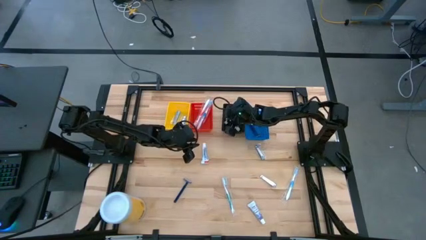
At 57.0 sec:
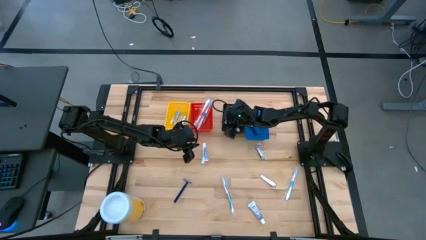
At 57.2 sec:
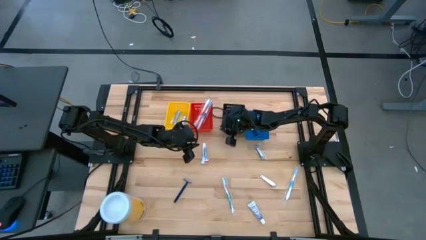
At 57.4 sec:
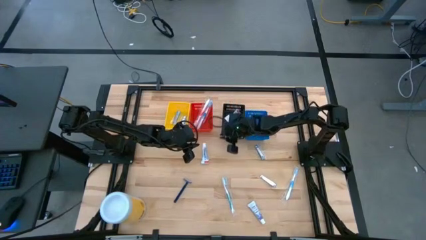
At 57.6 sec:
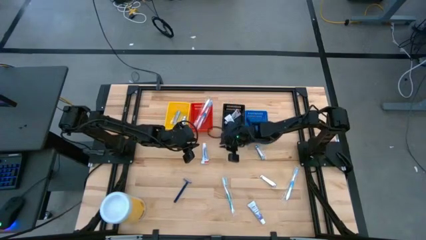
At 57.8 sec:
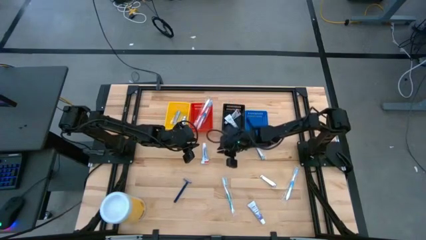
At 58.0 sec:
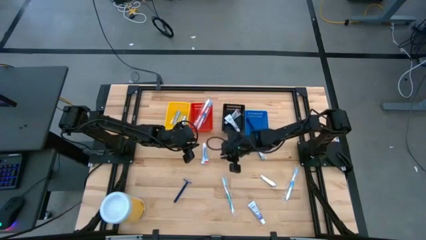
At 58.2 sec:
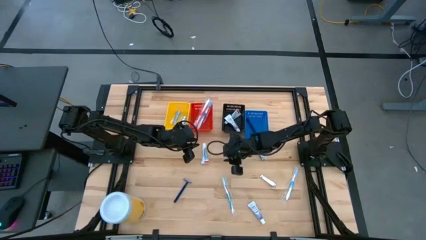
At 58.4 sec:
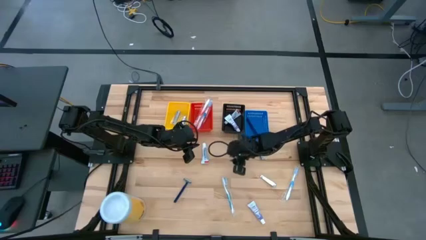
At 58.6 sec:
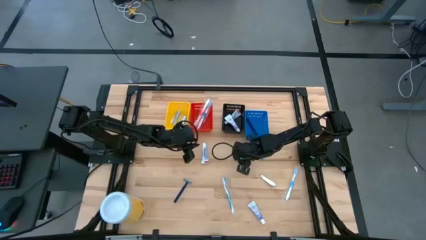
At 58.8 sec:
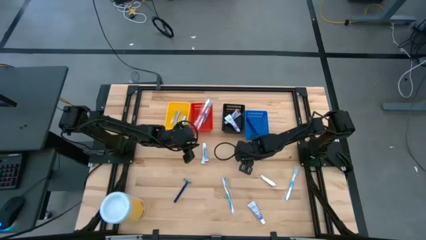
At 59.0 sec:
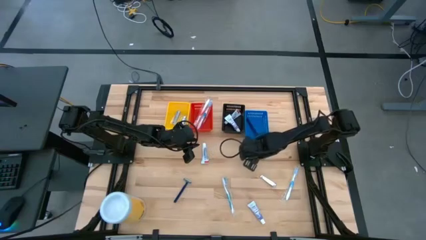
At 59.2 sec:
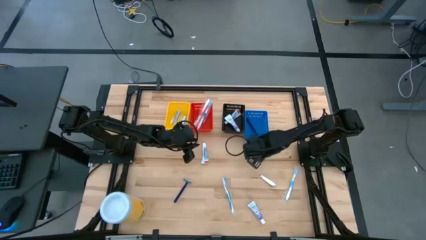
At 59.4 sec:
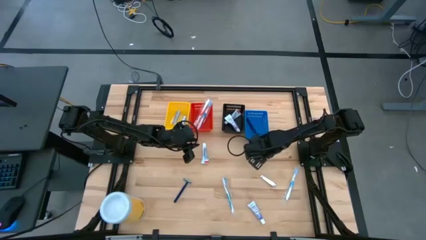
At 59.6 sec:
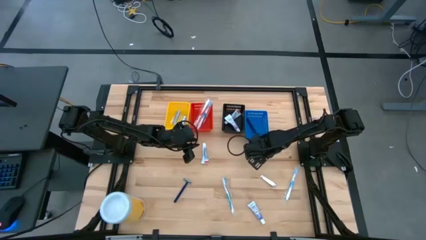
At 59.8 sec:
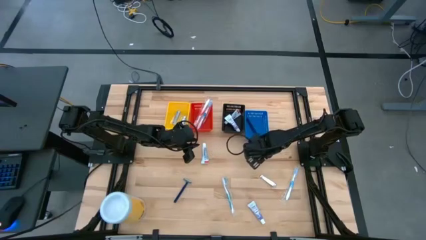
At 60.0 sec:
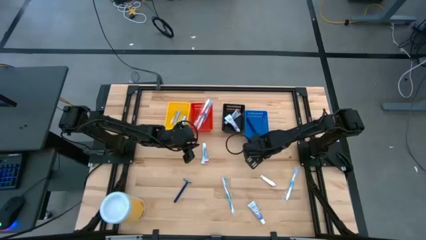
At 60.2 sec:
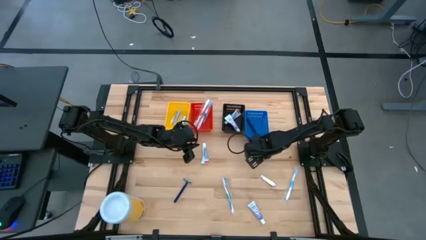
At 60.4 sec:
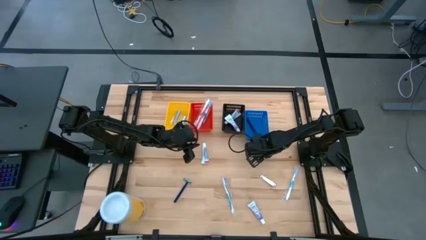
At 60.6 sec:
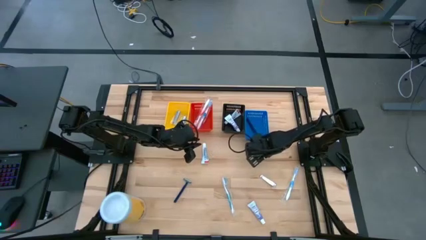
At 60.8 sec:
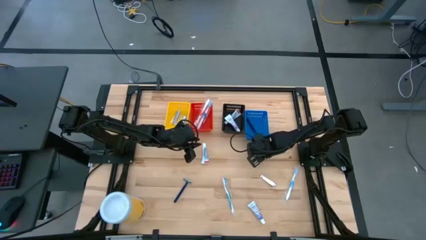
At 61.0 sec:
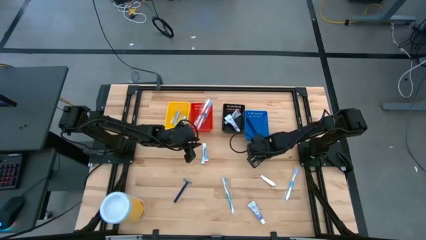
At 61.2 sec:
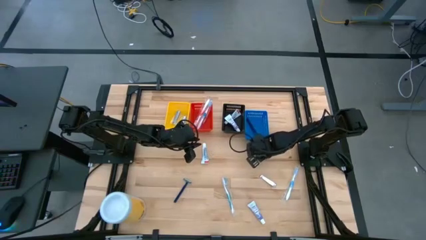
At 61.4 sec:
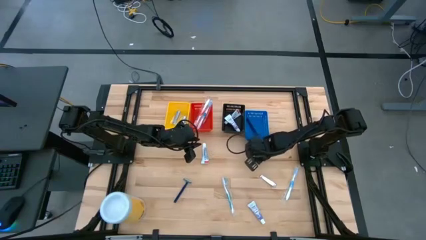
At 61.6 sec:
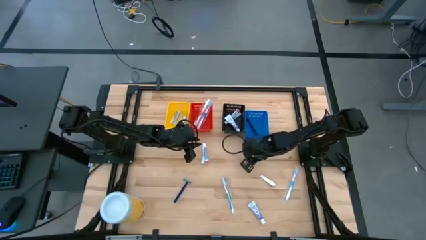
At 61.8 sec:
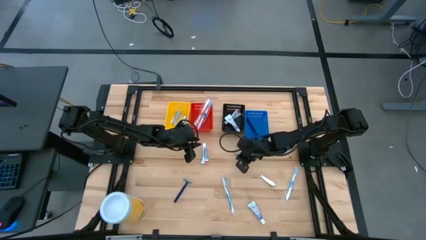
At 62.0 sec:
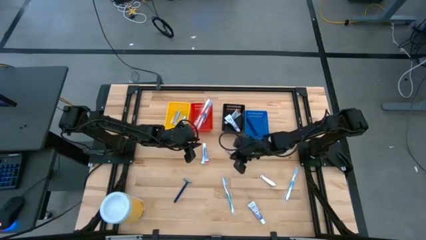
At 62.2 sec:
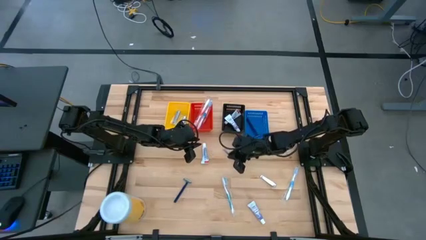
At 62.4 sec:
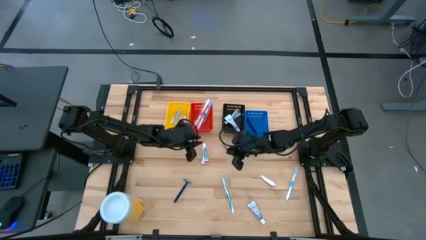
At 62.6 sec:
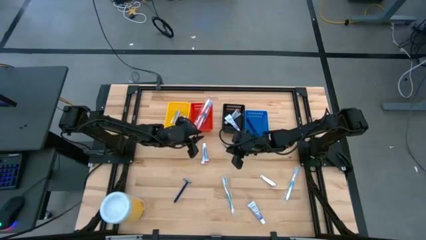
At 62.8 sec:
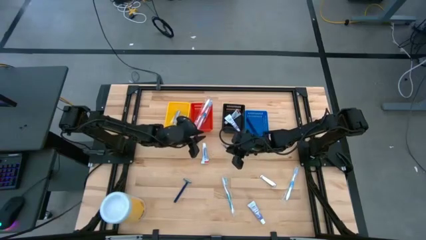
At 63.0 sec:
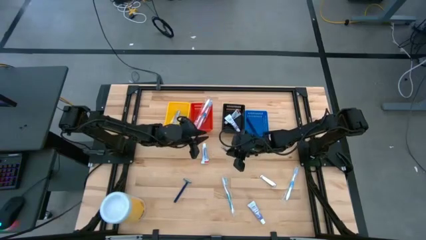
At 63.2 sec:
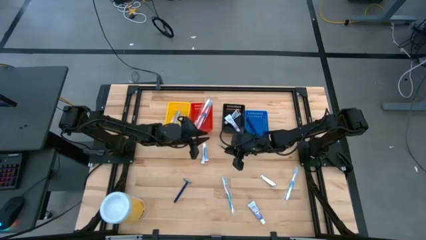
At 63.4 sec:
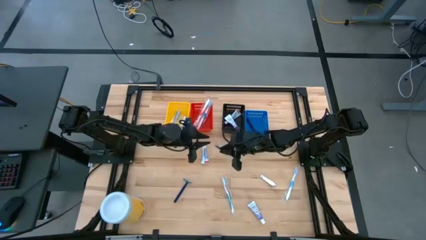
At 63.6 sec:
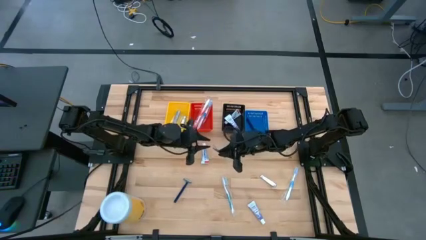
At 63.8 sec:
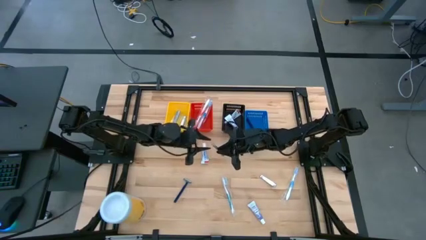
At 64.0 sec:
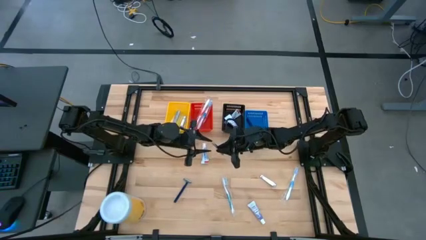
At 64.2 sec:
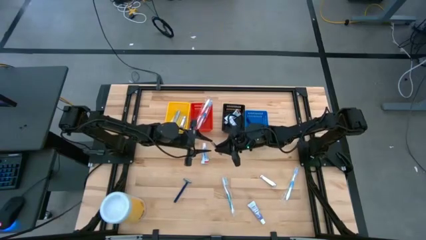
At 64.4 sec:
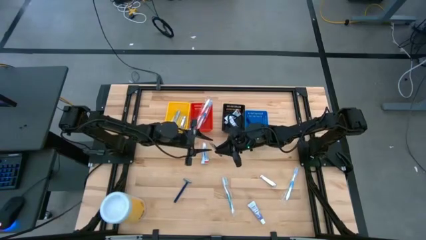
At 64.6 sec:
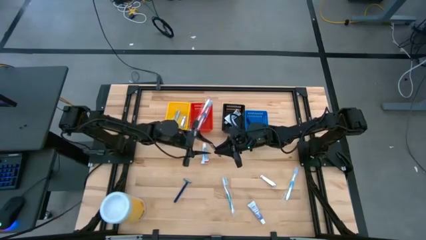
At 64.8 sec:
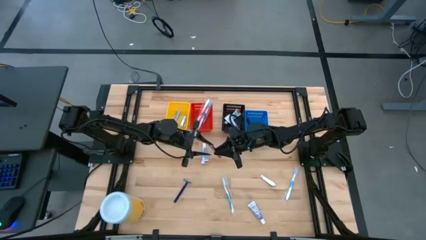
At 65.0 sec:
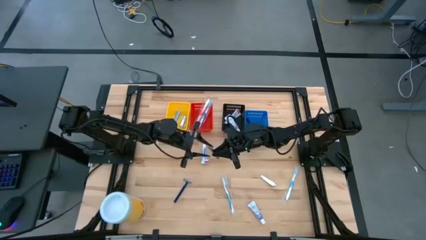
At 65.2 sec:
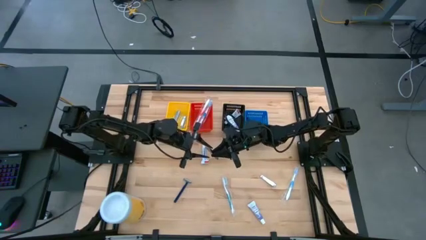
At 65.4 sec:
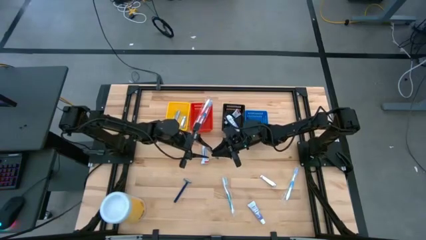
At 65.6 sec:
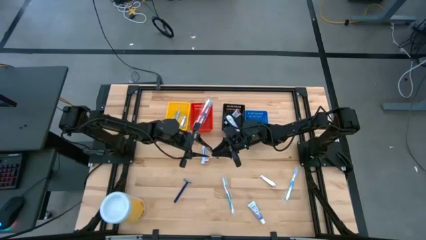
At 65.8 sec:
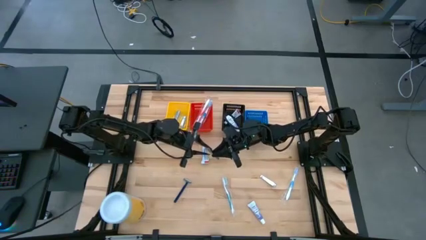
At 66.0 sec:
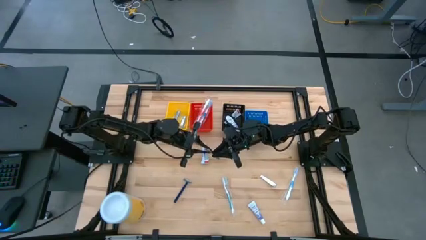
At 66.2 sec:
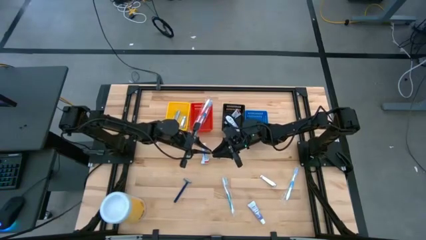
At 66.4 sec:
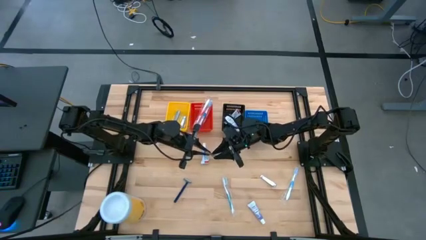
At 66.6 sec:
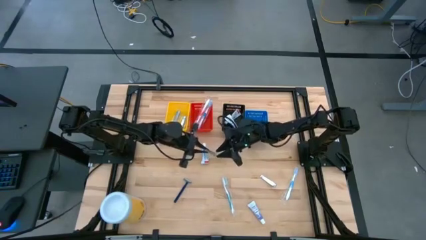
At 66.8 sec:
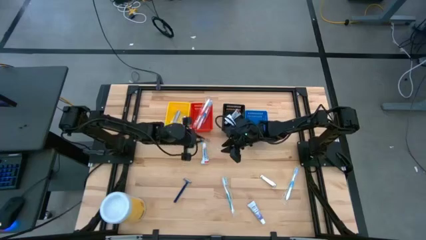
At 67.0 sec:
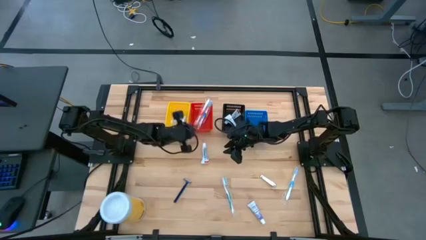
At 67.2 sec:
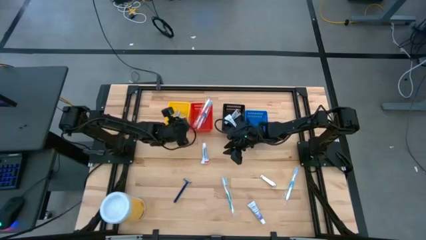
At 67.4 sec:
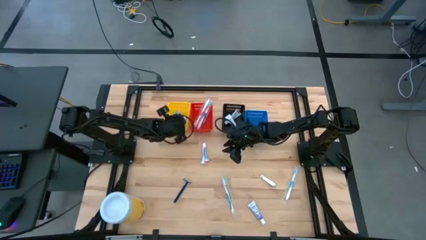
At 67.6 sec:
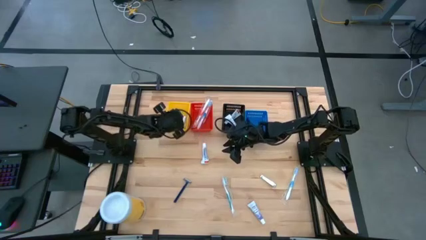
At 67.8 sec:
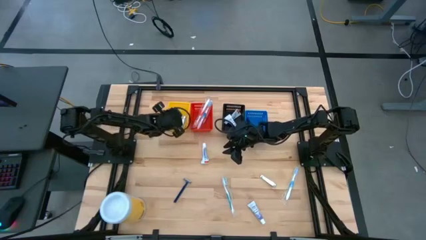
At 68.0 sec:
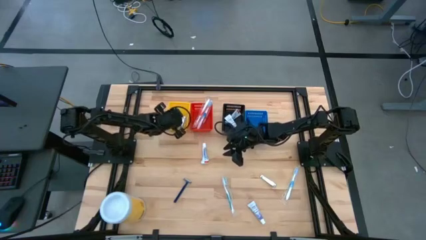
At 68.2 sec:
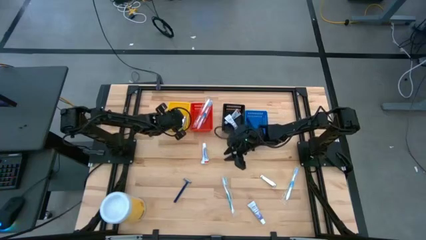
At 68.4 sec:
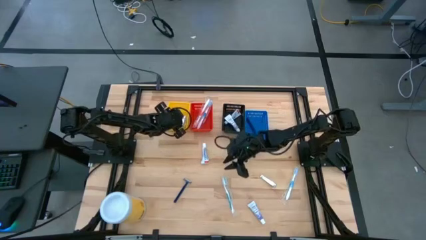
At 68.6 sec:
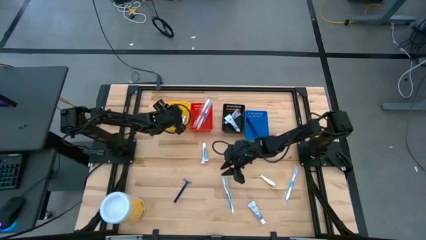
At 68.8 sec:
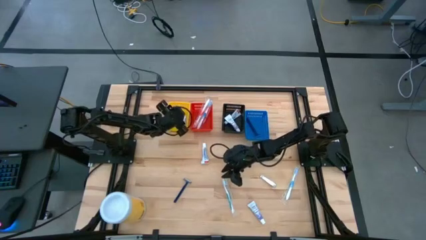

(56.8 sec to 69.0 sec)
Task: Pick & Place Travel size toiletries
Put the silver nail cutter into the yellow bin

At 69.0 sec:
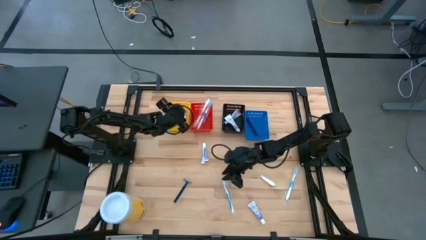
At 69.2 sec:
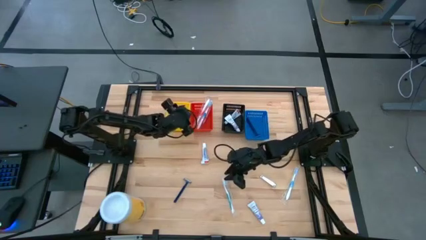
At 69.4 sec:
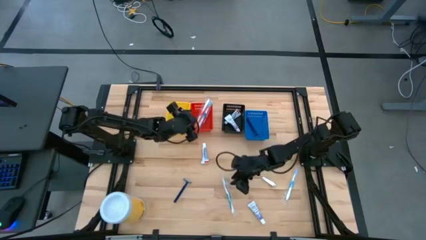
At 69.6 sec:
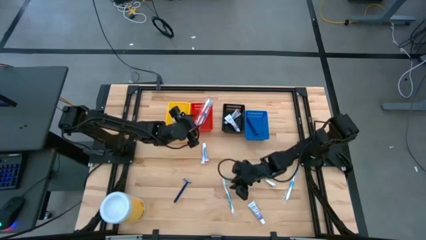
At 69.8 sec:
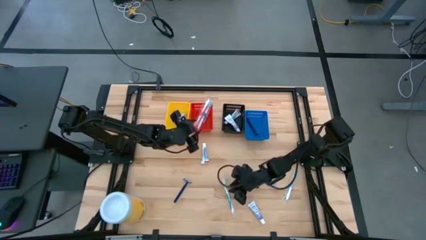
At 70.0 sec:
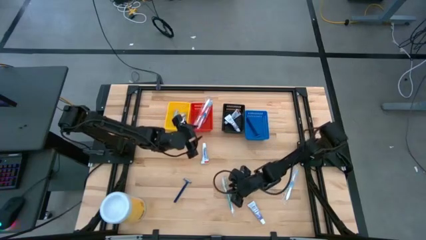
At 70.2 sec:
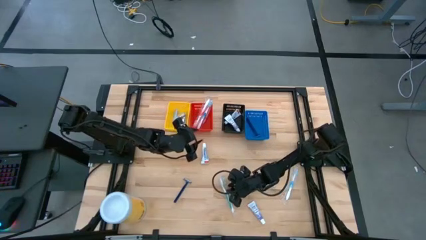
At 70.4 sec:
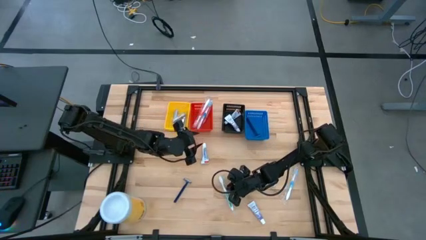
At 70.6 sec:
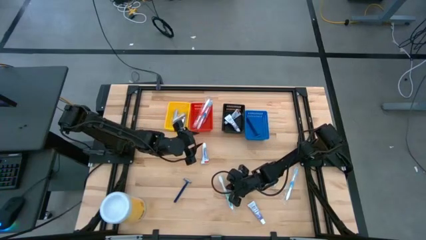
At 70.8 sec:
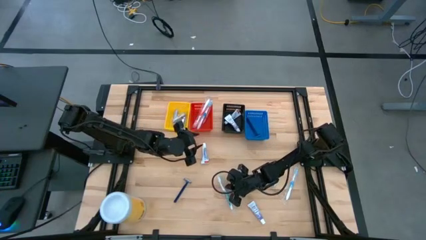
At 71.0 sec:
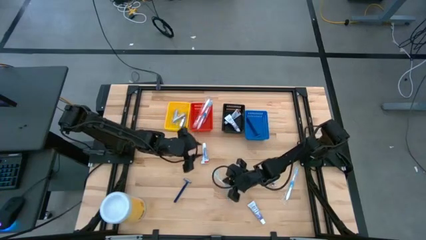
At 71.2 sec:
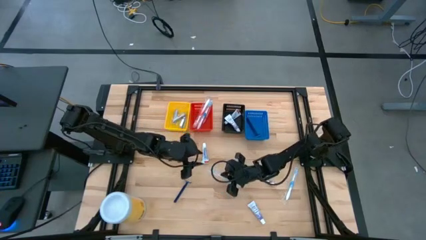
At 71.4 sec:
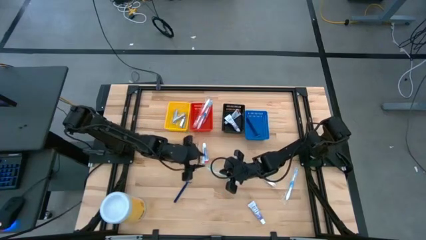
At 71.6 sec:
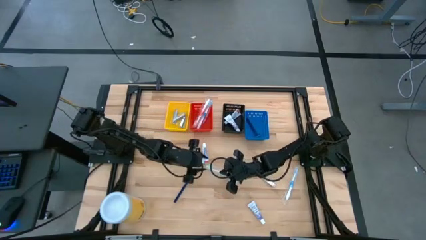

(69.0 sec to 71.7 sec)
Put the green toothbrush into the red bin
